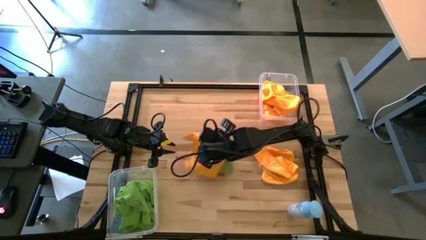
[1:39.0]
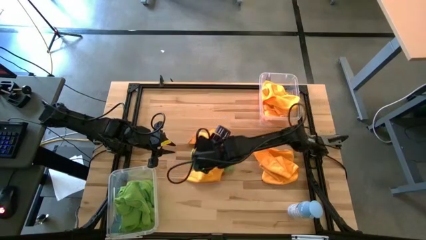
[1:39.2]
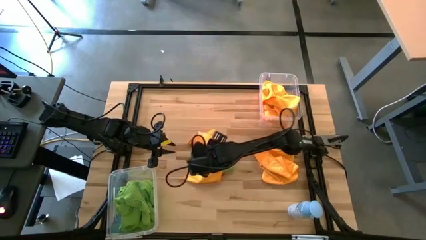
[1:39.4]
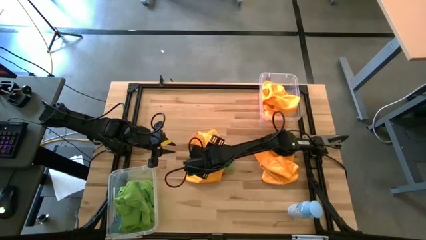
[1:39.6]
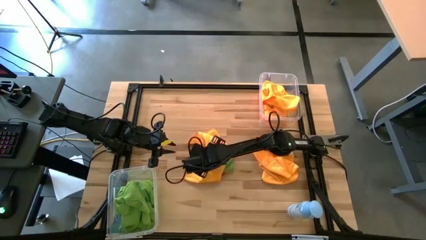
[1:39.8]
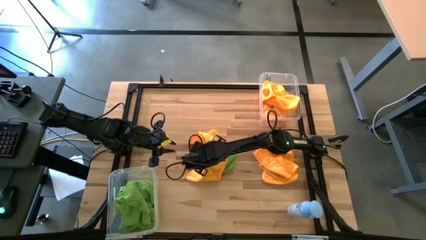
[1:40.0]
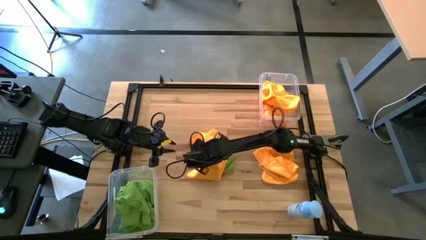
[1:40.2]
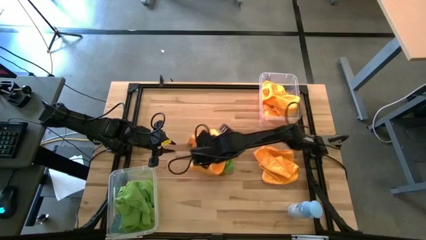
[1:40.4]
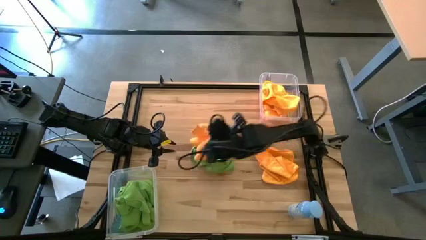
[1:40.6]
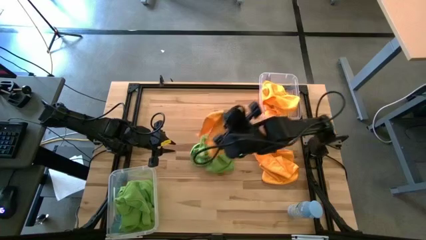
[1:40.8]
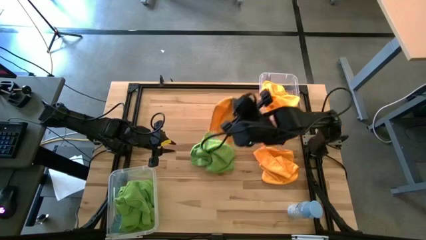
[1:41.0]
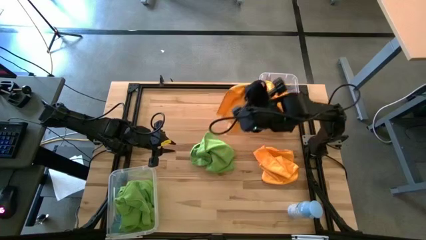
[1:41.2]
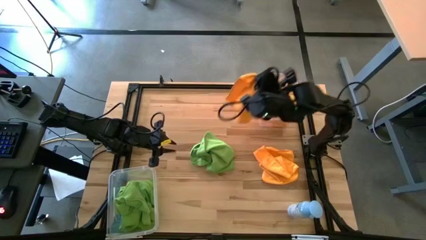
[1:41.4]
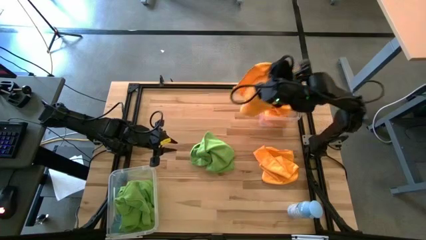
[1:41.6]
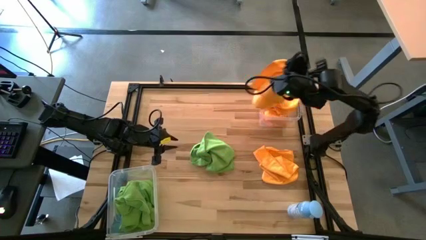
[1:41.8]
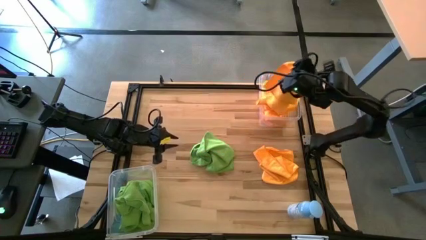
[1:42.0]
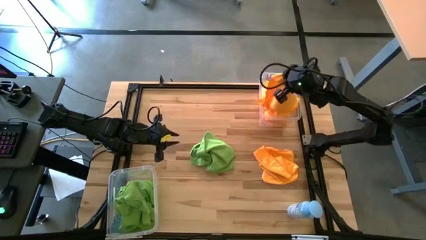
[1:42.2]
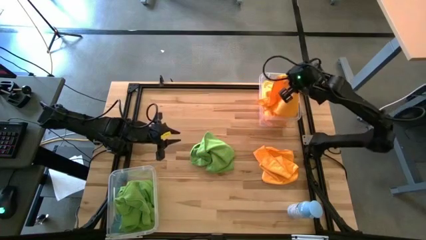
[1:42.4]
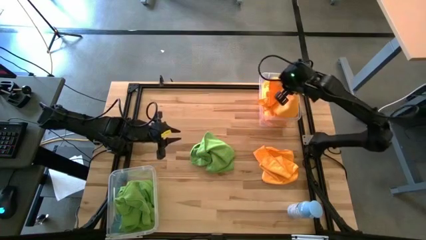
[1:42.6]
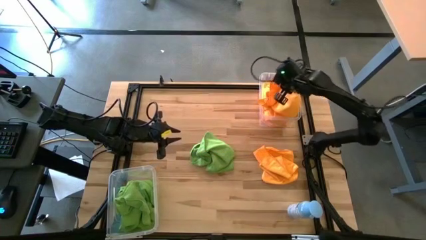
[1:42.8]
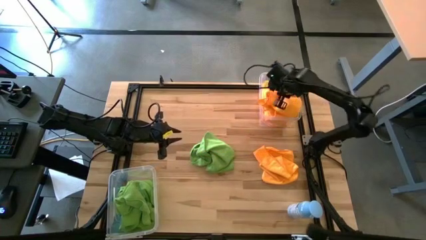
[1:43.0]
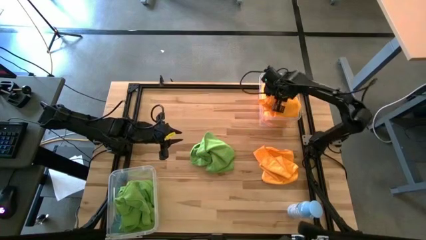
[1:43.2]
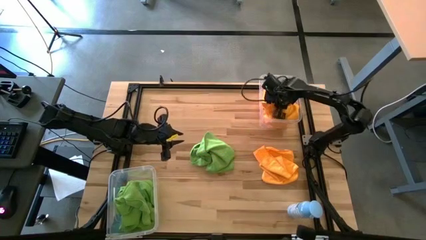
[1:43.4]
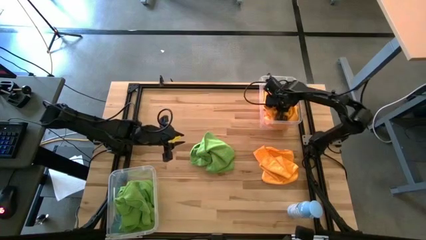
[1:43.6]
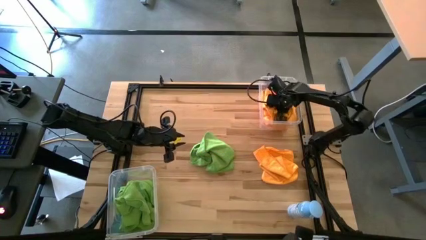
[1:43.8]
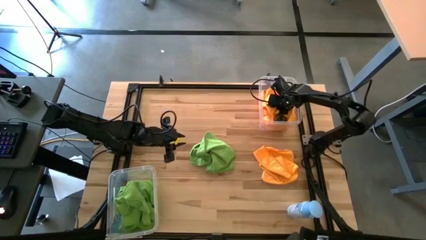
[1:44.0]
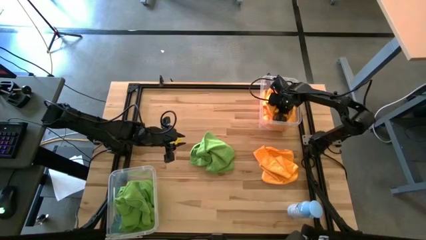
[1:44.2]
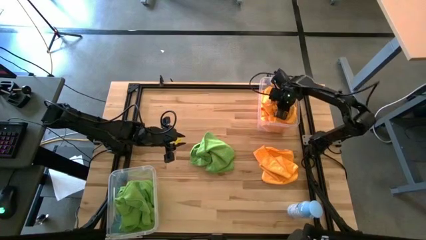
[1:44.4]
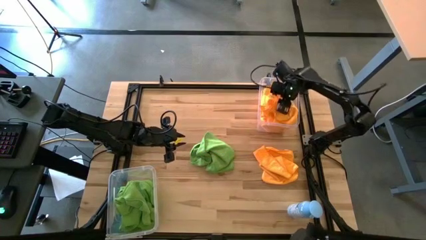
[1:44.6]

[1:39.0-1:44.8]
Task: Sort microfiber towel by color & place in baskets
Put the orange microfiber towel into the top transparent bin

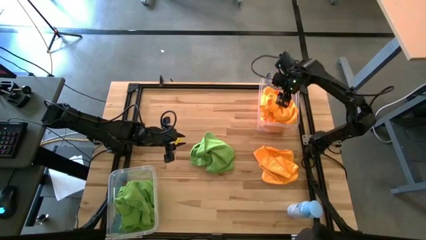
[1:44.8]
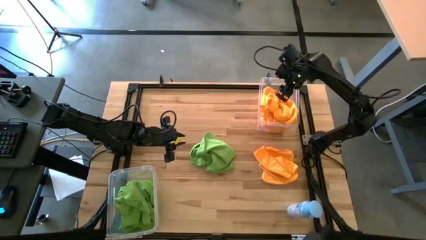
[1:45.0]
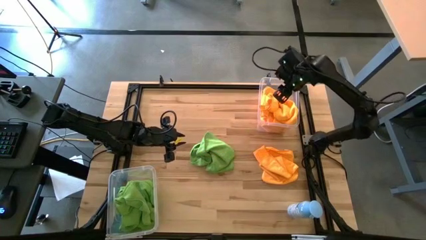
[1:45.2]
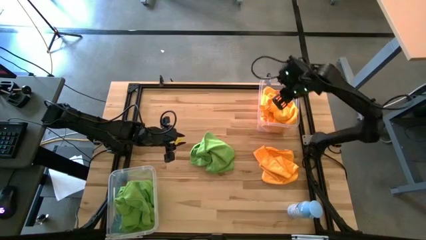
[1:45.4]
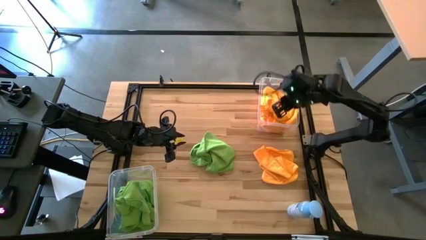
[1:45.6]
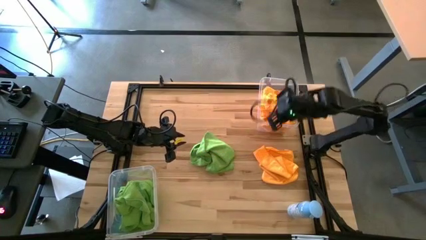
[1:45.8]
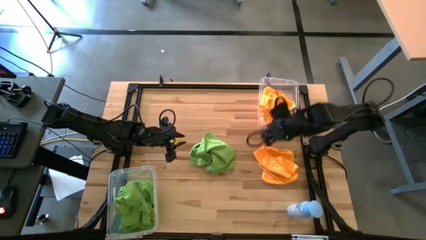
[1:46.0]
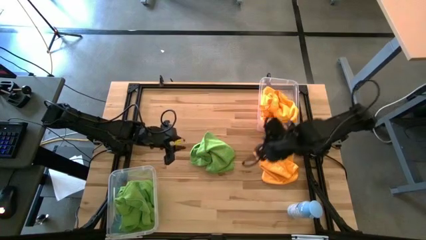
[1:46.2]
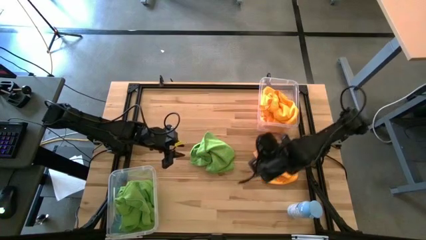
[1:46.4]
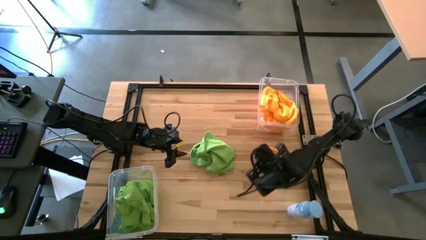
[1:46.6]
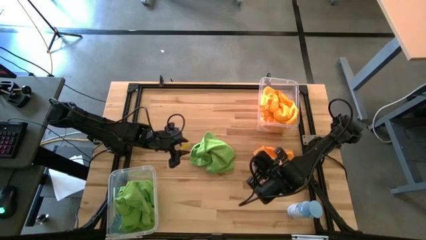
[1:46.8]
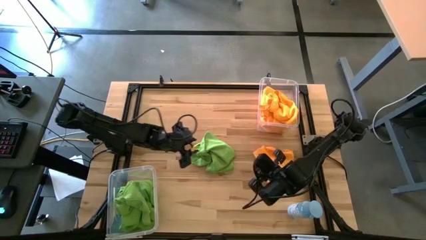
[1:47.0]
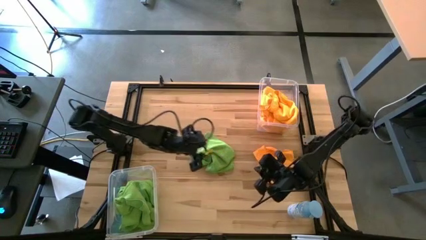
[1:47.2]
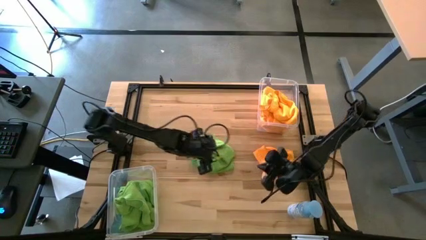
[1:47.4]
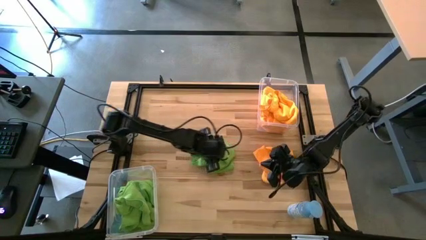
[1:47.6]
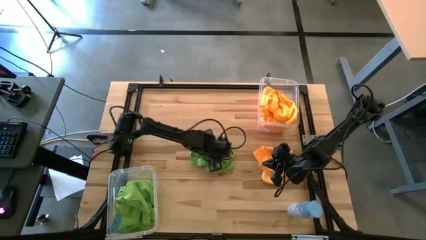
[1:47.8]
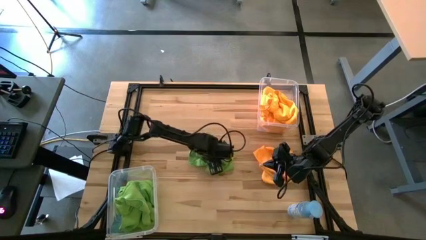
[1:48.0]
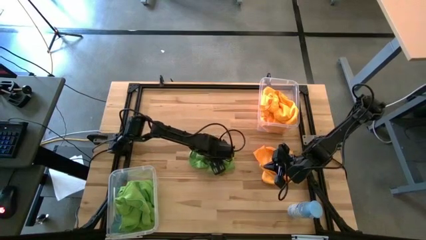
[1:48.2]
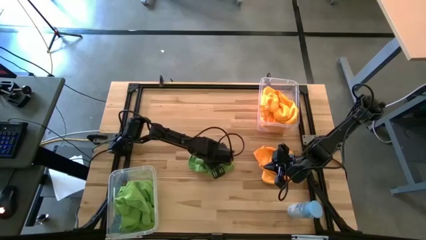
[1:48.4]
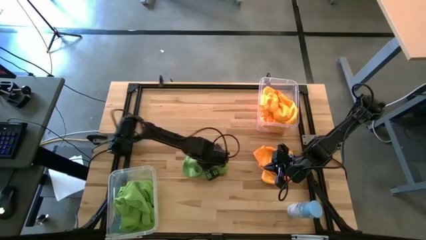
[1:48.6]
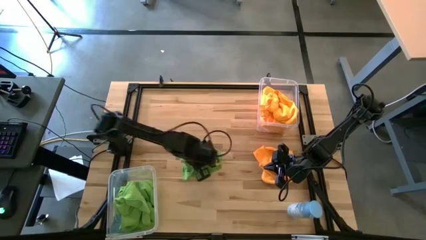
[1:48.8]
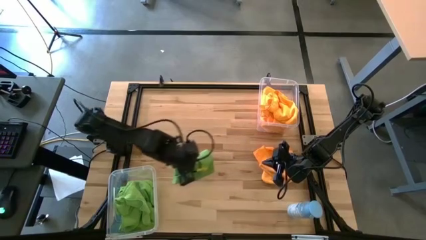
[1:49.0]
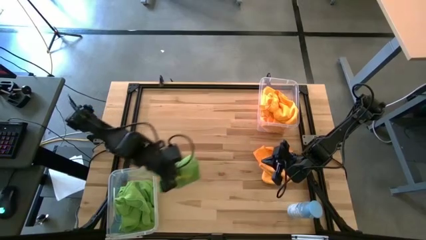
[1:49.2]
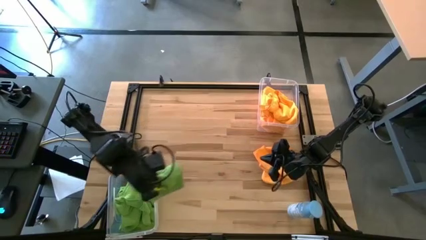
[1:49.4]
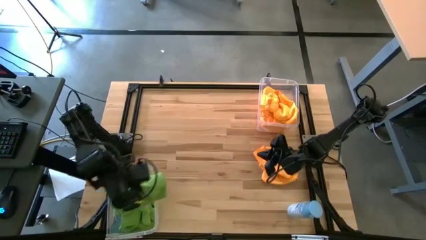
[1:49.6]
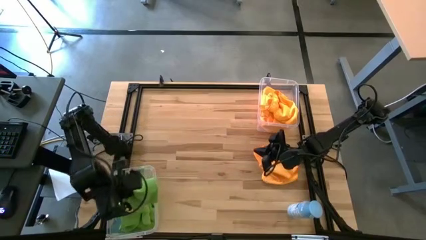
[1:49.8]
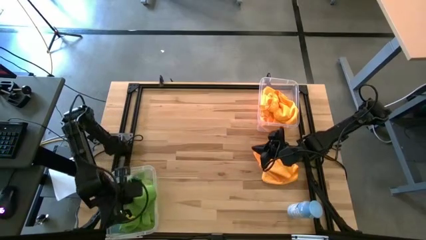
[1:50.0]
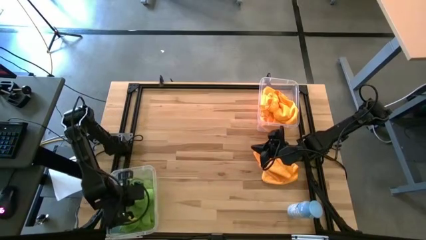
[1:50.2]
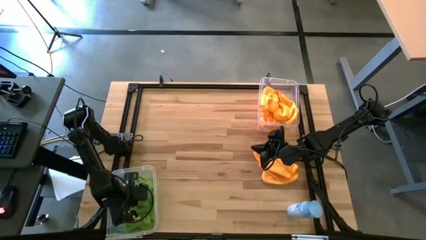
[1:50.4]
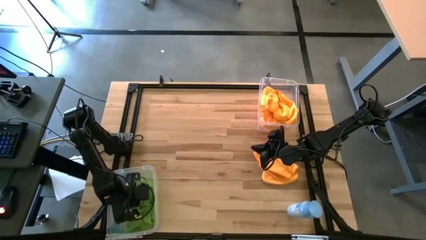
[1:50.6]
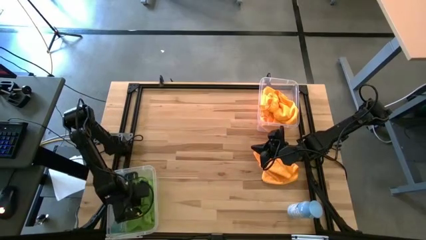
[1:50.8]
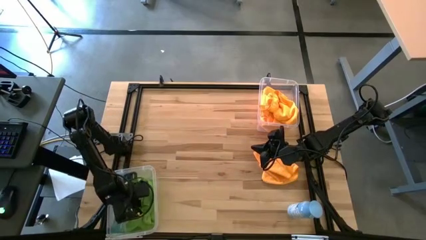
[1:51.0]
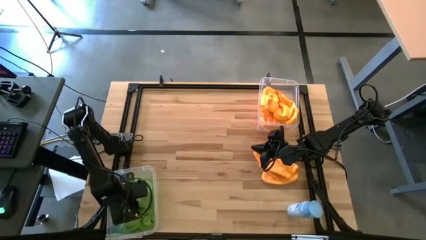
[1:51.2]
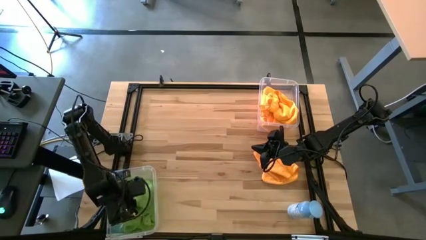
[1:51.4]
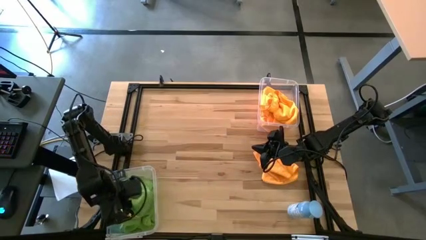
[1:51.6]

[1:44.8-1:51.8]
Put the green microfiber towel into the bottom transparent bin

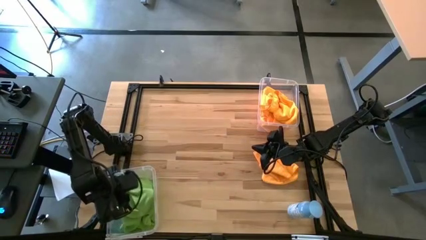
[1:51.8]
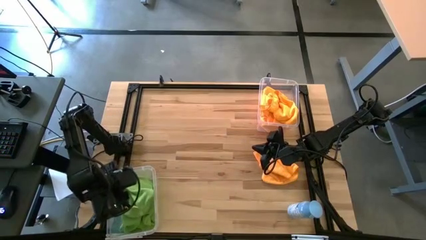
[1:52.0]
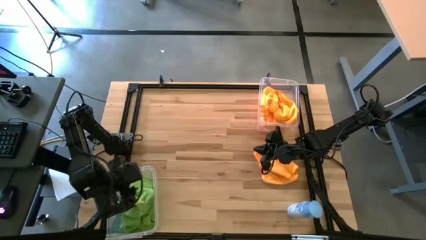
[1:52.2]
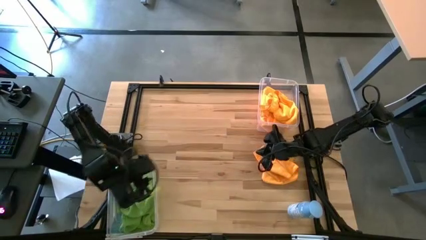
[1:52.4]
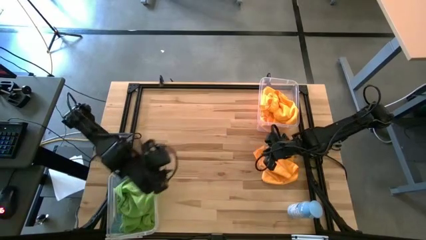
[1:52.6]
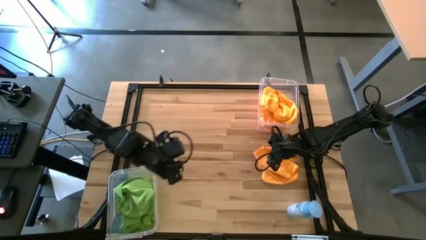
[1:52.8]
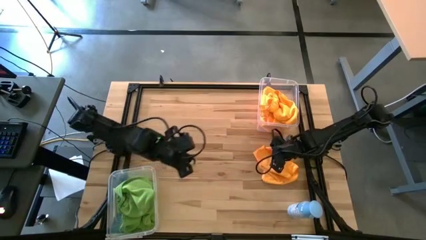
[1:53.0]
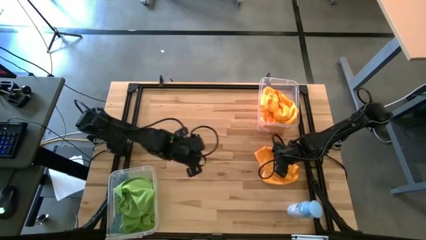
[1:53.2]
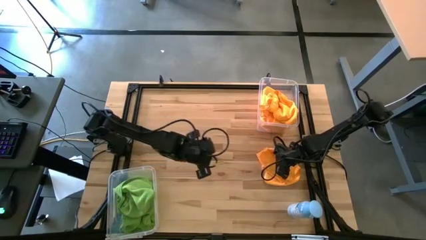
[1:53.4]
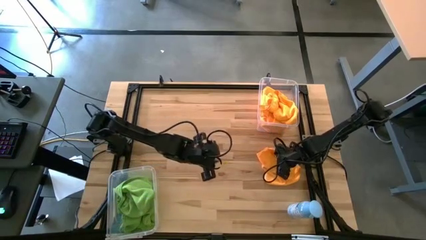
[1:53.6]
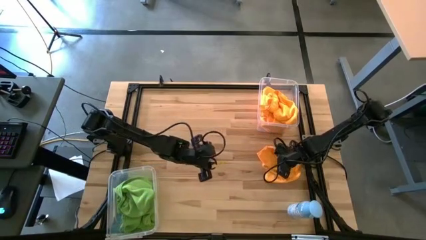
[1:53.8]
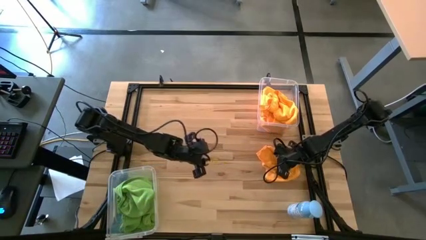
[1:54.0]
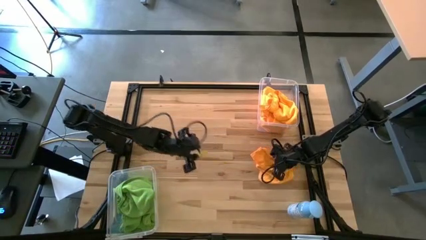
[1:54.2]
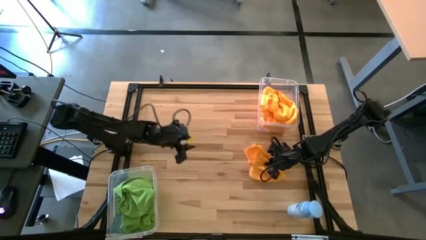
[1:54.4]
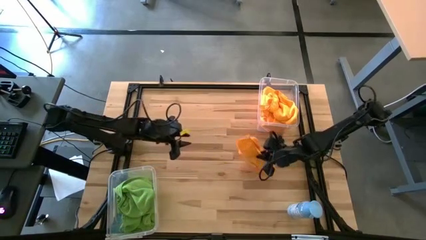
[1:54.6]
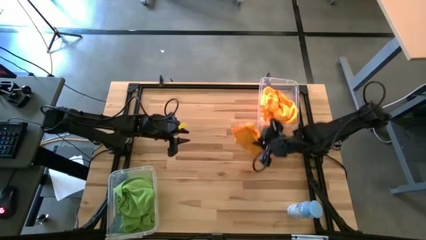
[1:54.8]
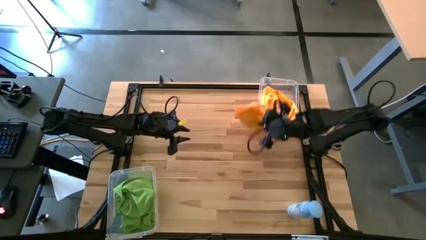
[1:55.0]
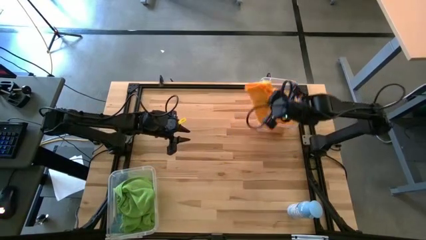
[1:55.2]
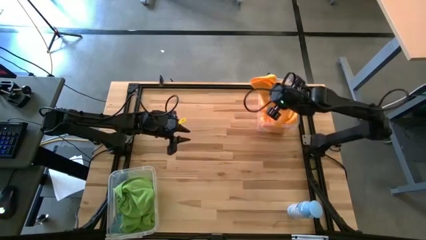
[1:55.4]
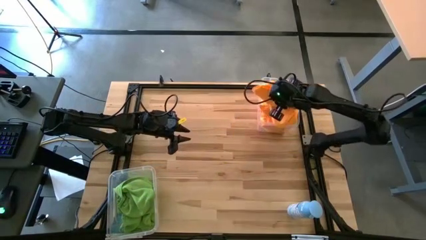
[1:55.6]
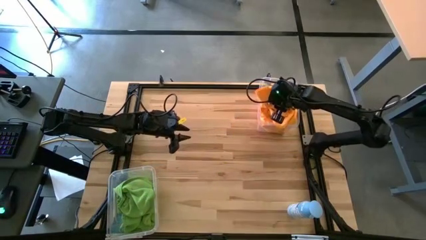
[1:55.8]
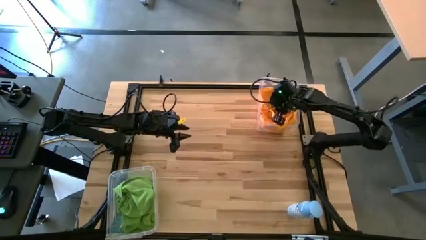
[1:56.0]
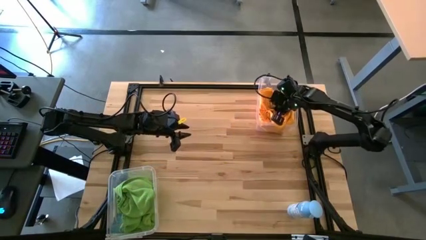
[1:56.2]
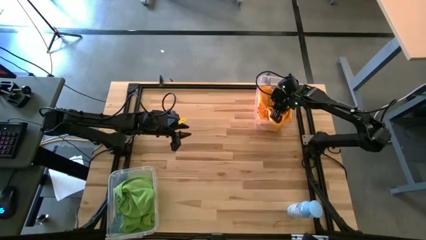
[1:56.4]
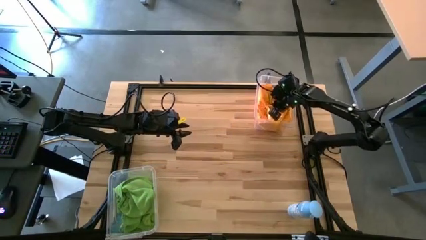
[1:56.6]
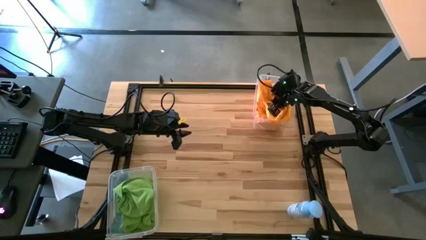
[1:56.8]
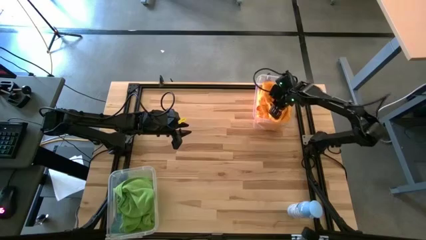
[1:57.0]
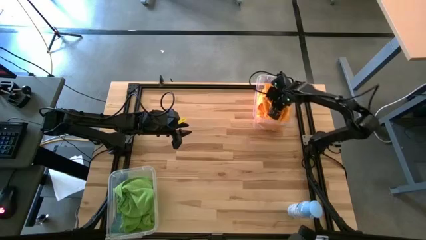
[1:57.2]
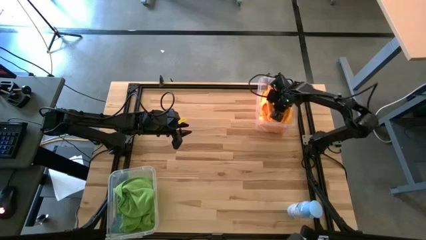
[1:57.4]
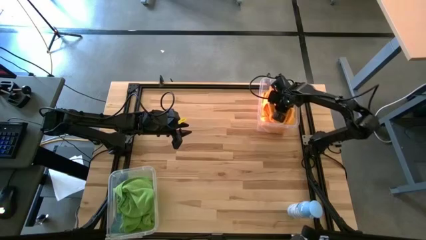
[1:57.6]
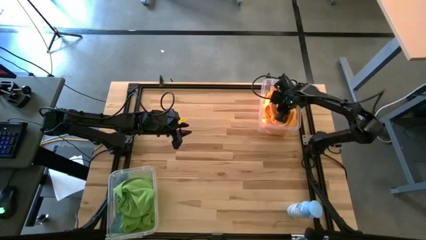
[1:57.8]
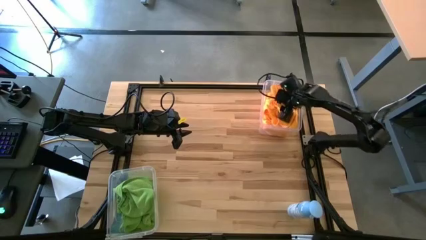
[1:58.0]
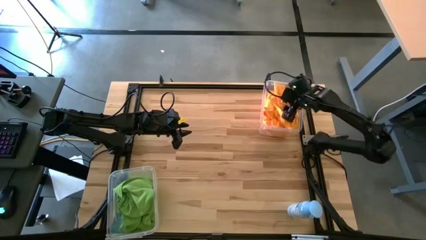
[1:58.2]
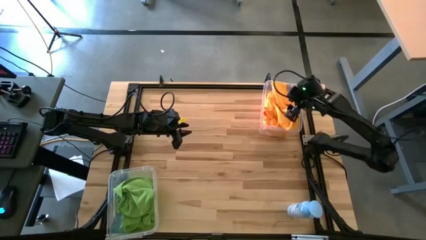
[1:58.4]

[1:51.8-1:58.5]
Put the orange microfiber towel into the top transparent bin
